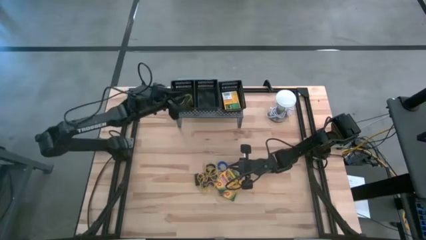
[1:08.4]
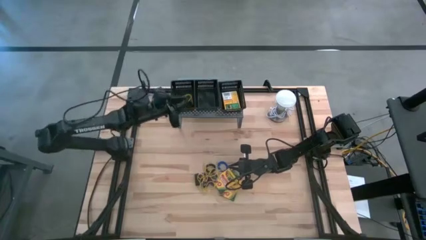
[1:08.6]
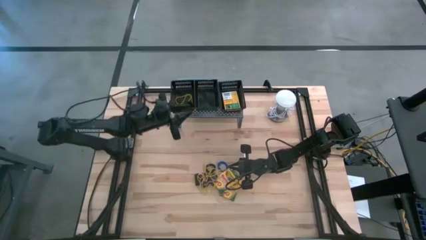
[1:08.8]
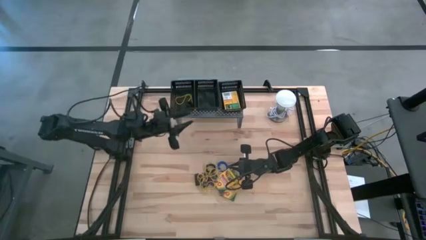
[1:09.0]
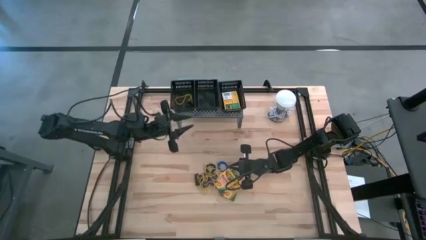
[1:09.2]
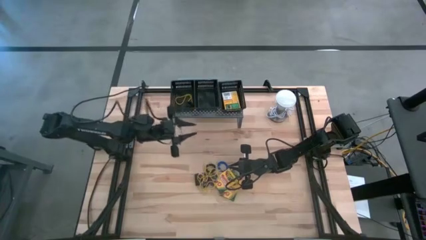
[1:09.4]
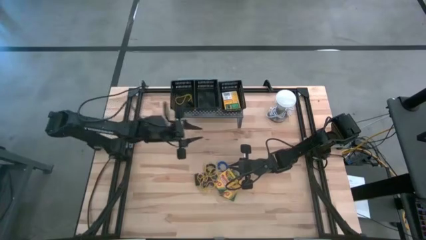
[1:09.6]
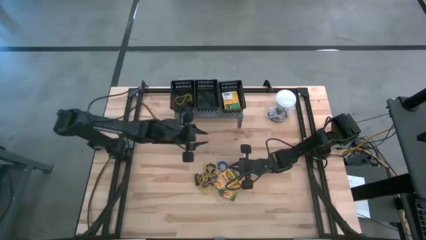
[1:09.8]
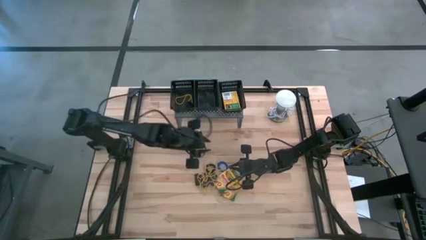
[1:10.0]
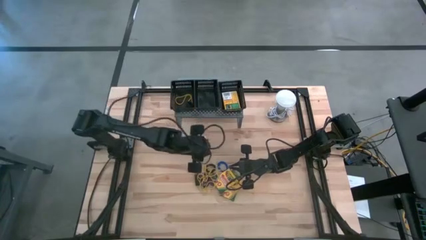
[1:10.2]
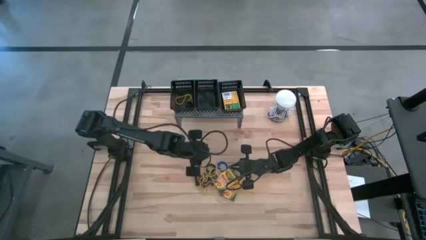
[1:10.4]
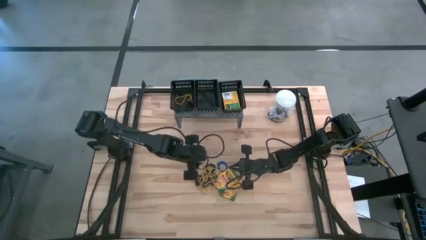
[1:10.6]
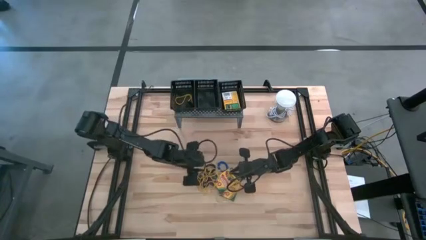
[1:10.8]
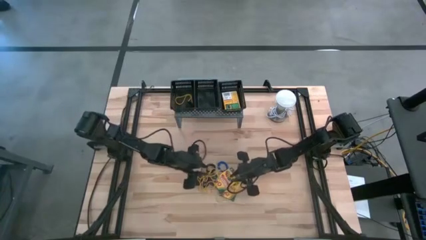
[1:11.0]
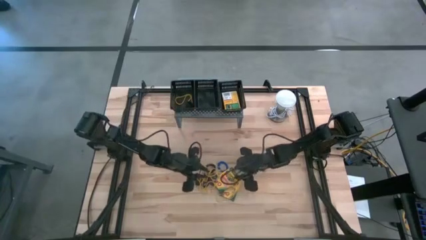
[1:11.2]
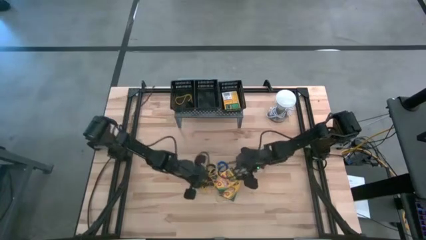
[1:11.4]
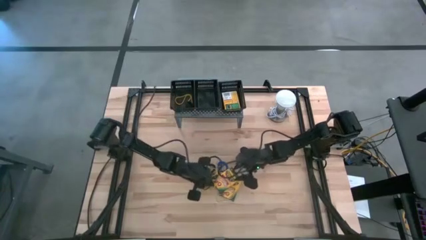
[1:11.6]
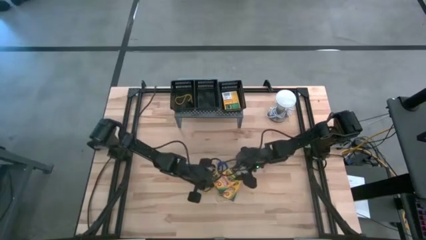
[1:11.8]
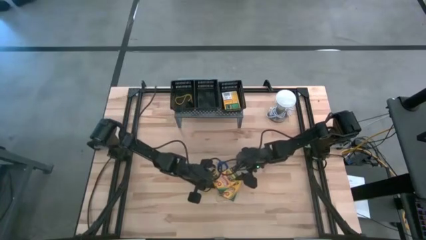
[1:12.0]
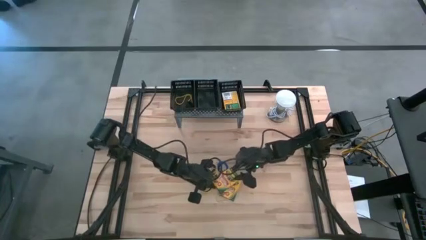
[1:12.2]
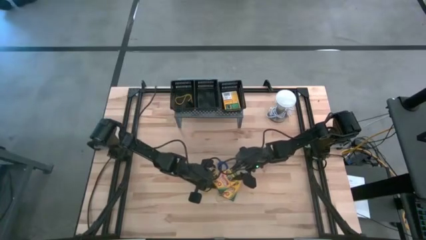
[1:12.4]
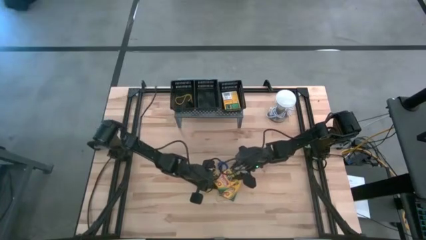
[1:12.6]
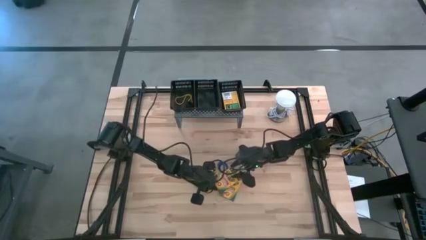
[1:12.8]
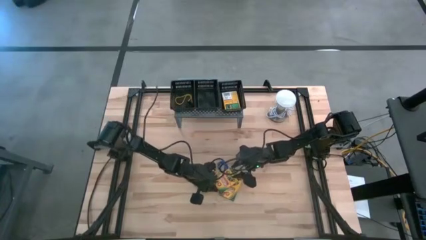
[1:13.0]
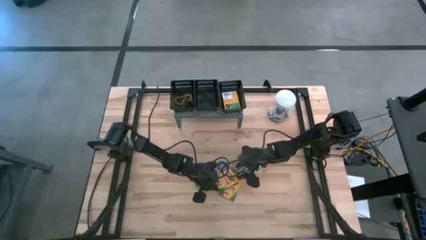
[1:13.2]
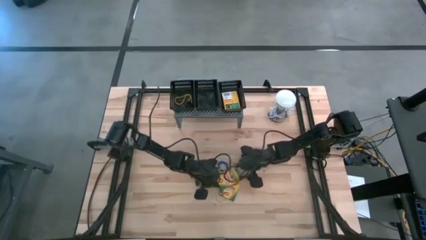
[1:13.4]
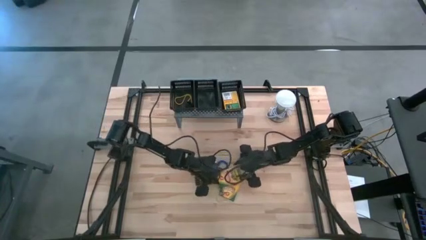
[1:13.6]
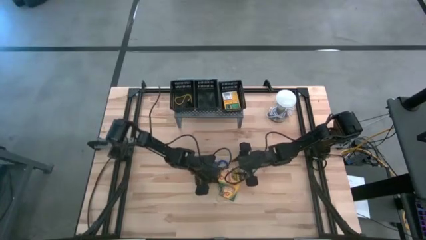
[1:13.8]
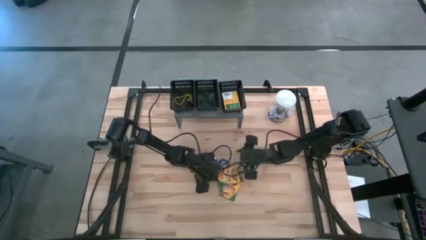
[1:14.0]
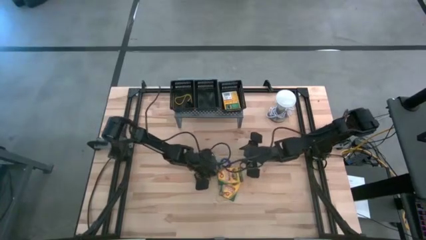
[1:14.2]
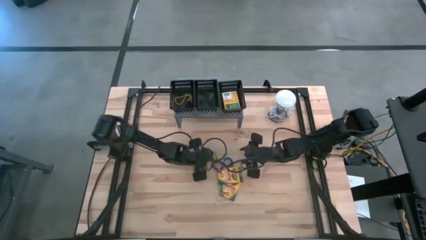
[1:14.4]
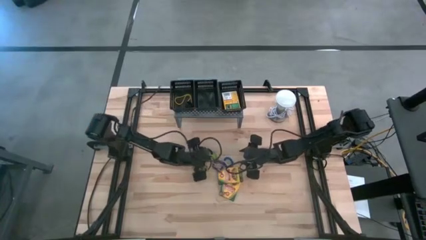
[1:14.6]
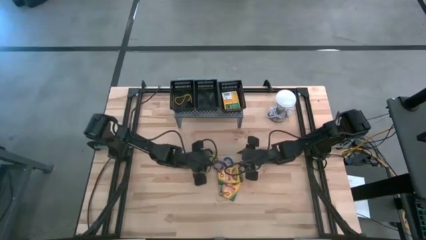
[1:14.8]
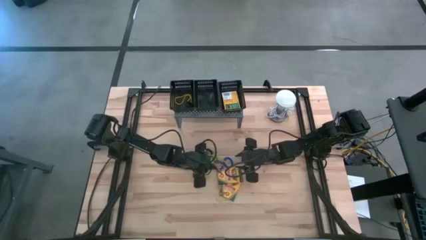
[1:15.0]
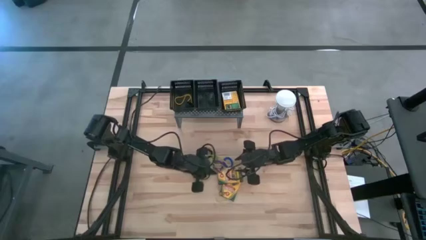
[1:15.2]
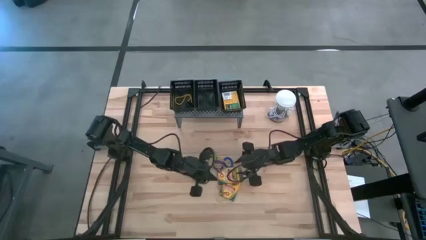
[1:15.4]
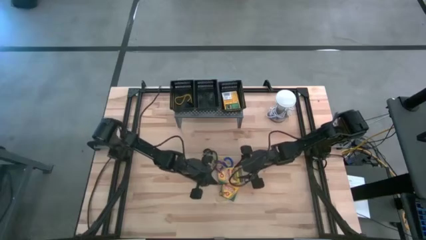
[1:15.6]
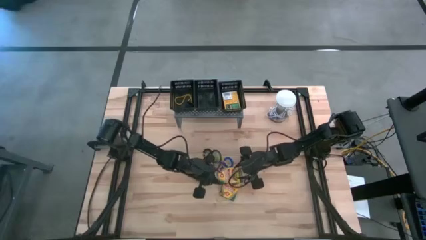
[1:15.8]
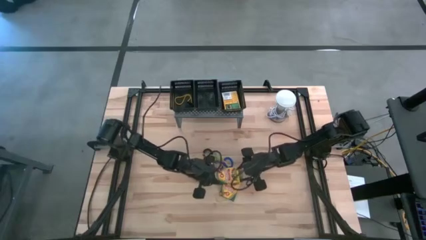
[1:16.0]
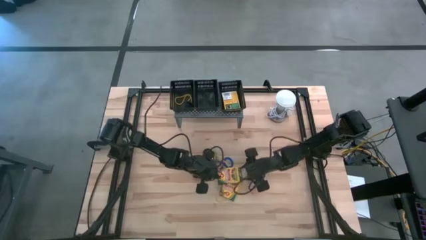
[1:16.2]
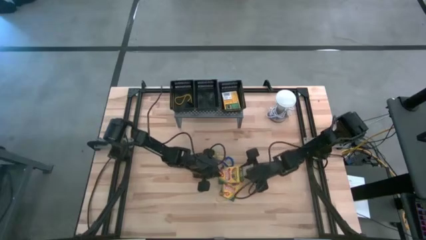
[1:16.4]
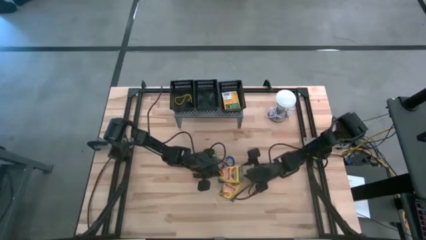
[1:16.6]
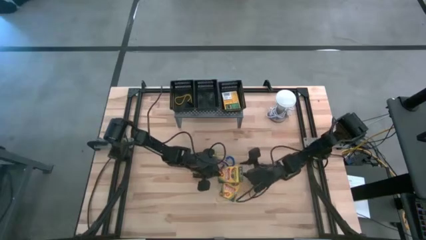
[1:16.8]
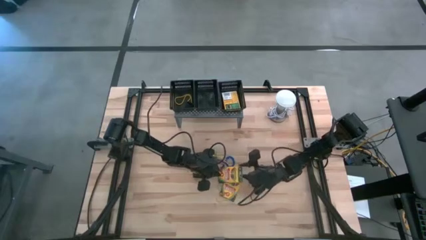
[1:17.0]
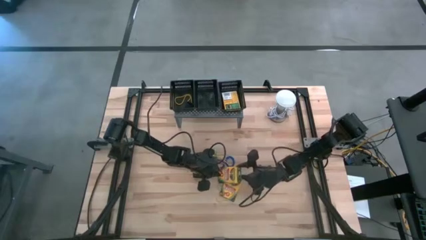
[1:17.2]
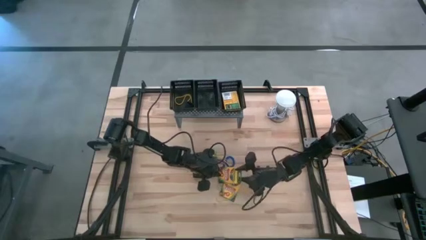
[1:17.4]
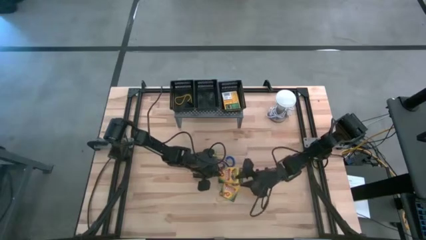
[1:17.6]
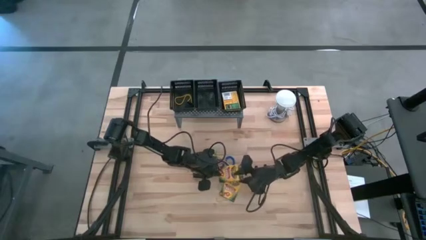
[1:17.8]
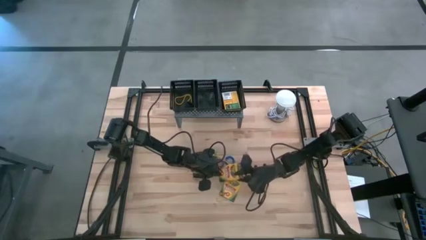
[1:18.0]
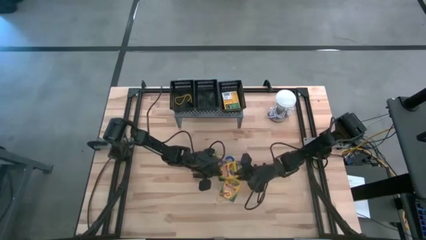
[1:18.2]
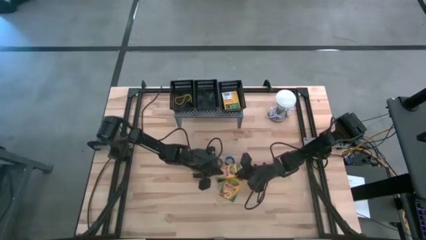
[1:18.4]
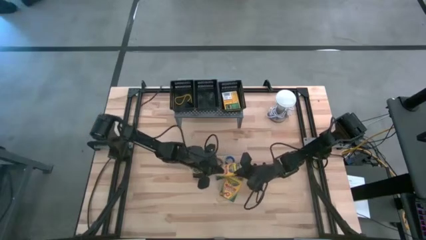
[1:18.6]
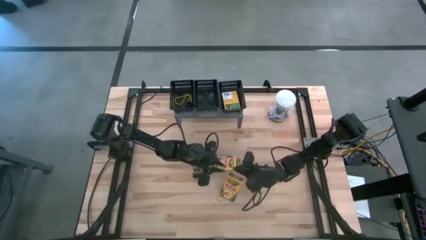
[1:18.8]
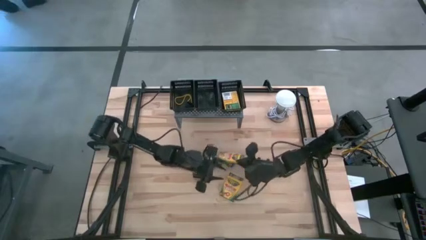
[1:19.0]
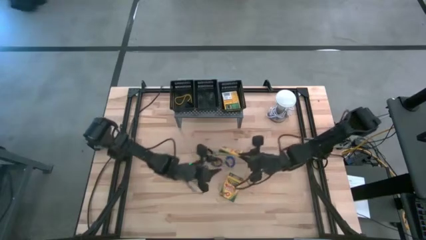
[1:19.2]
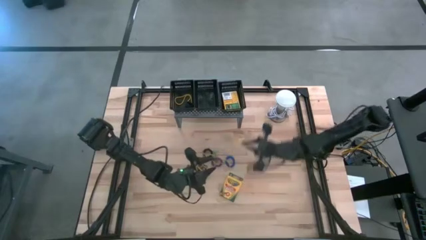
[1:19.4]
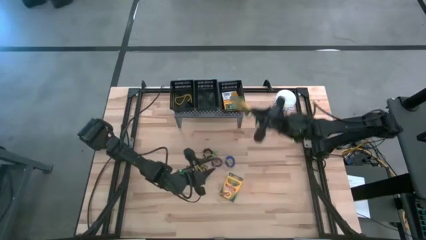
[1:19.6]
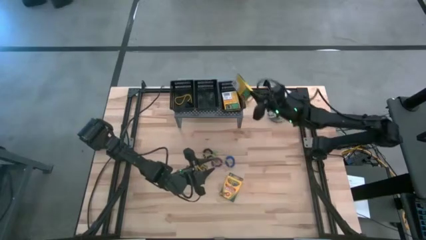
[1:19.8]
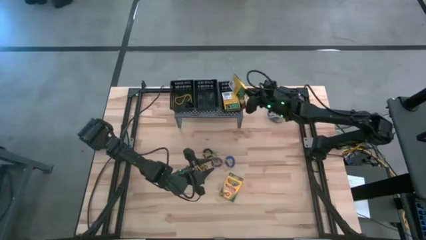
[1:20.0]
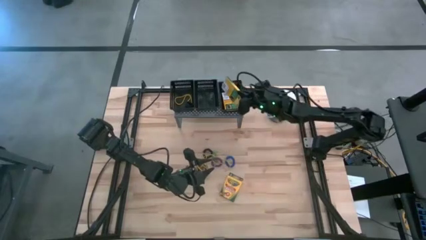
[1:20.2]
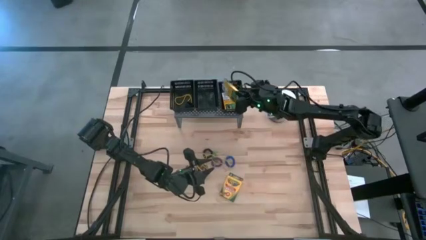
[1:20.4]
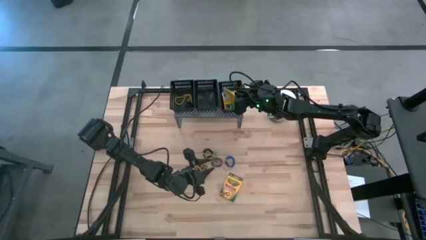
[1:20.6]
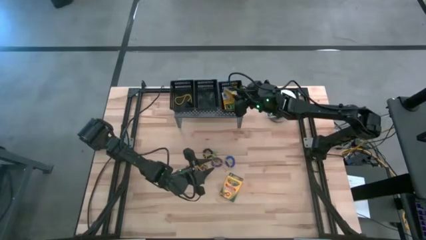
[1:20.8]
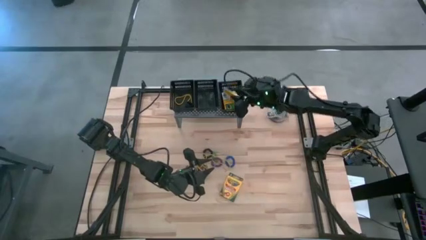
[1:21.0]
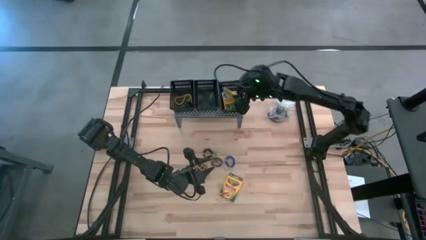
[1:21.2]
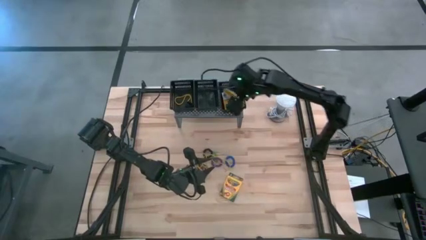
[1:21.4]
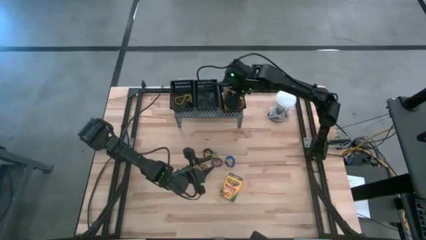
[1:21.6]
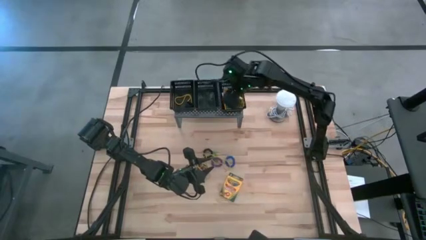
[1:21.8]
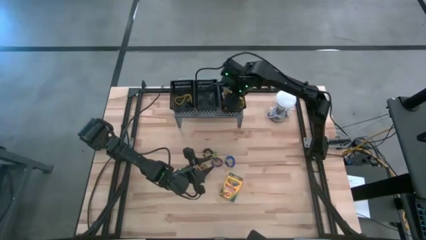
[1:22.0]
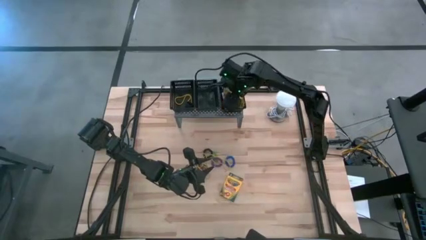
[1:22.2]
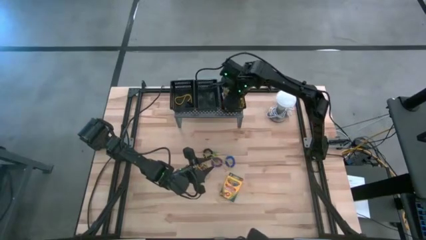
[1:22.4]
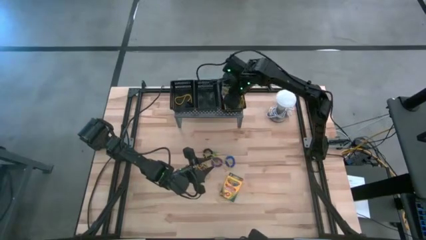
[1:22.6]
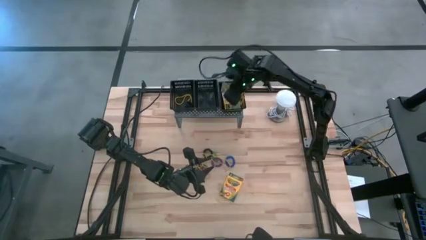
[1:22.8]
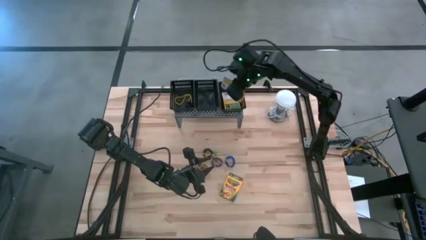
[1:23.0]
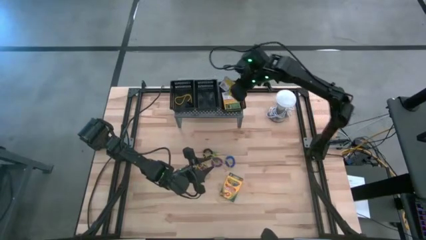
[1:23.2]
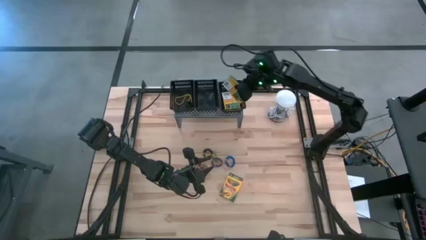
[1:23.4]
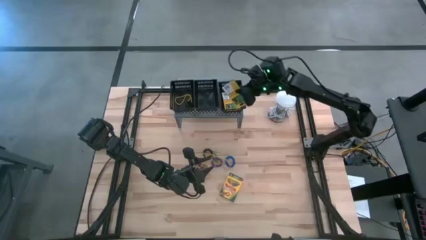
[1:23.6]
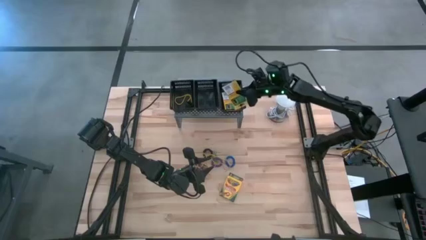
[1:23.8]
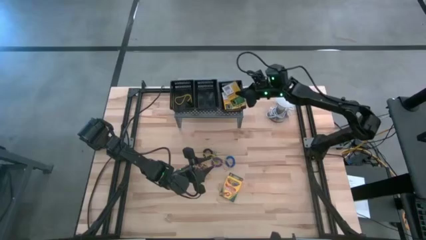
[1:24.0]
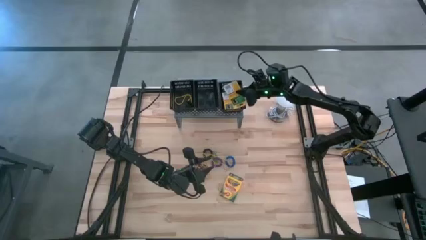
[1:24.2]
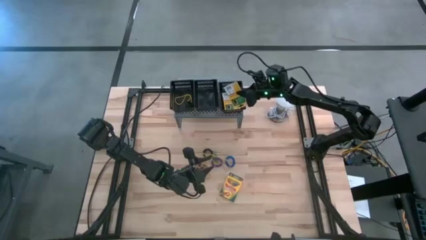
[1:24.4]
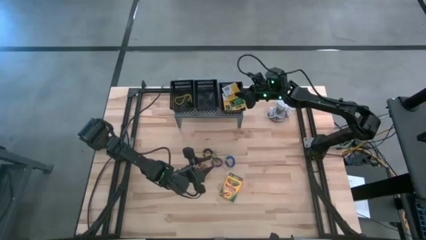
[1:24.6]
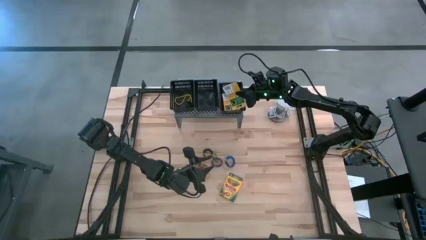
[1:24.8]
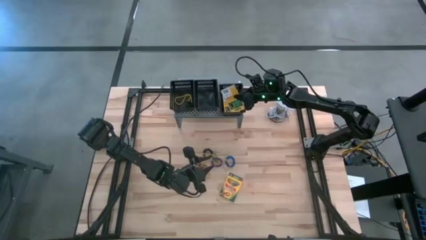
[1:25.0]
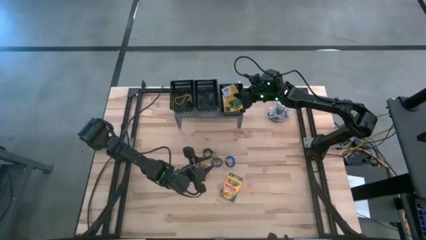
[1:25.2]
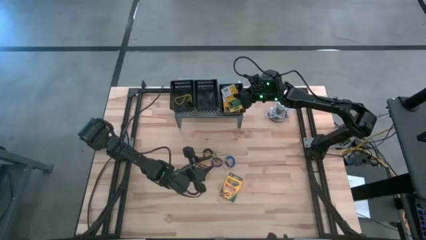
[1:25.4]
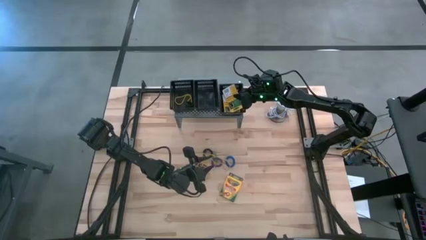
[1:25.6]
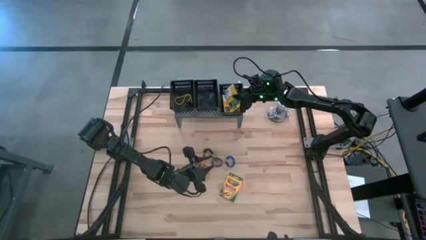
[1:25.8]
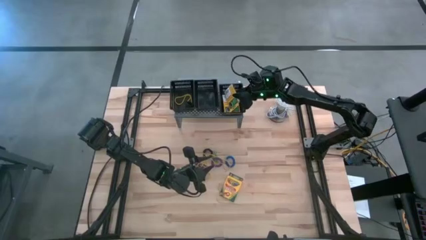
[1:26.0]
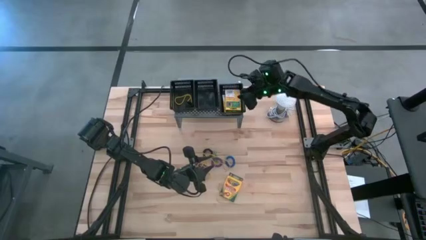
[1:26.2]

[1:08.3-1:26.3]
Task: Pick & Place Office Desk Supplies
Put the crayon box into the right black bin on the shelf
